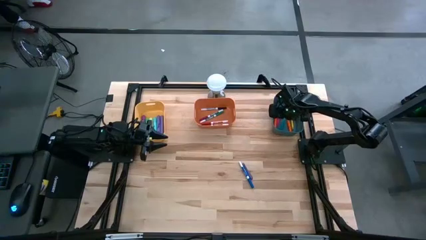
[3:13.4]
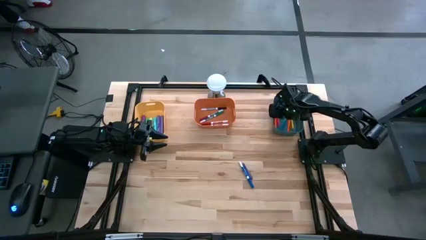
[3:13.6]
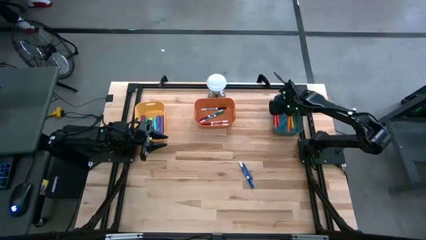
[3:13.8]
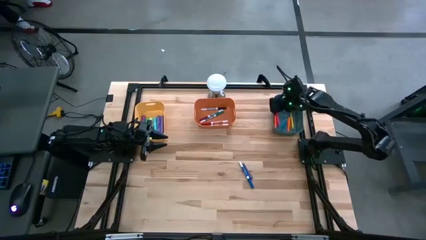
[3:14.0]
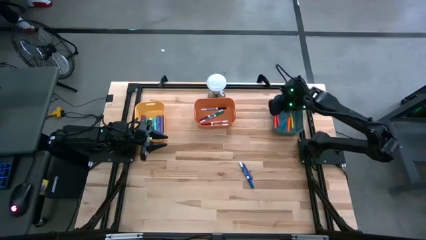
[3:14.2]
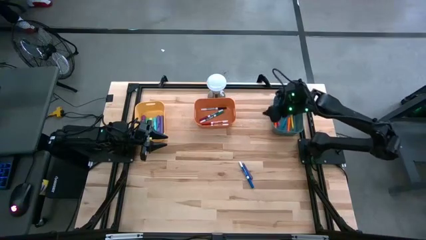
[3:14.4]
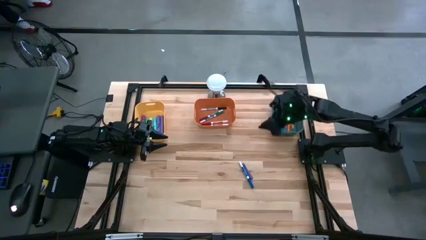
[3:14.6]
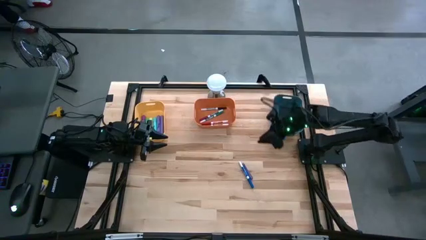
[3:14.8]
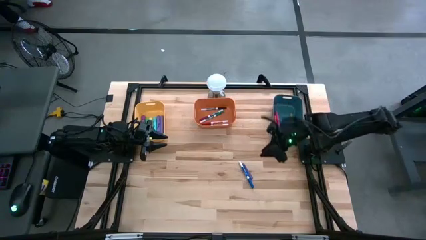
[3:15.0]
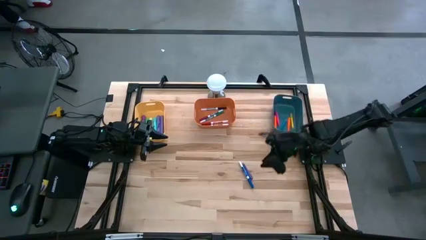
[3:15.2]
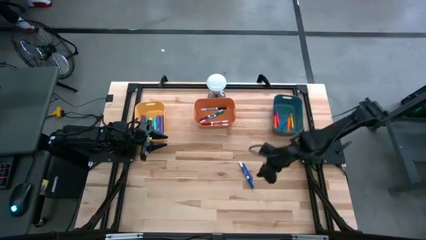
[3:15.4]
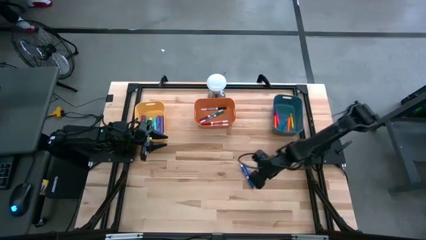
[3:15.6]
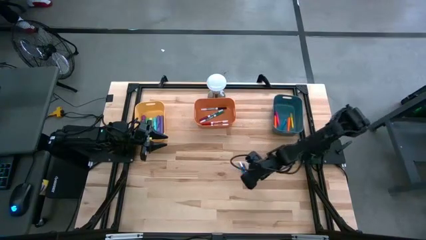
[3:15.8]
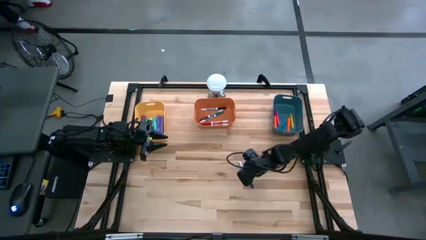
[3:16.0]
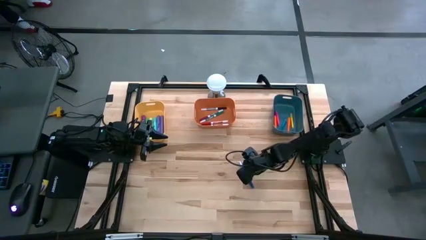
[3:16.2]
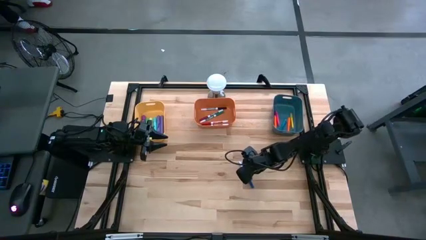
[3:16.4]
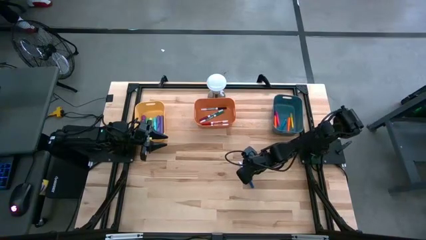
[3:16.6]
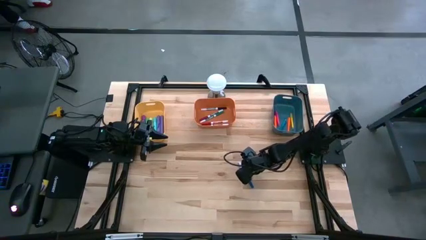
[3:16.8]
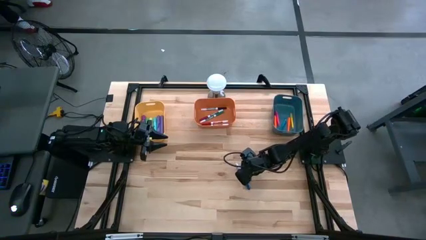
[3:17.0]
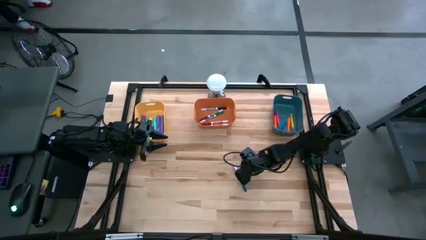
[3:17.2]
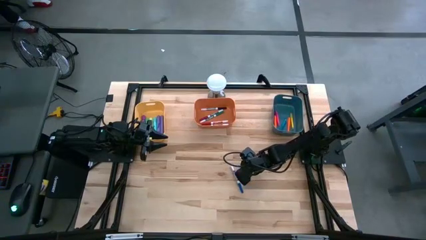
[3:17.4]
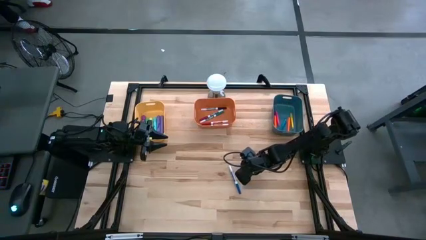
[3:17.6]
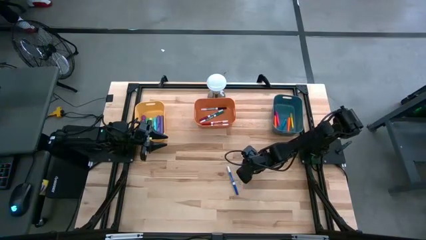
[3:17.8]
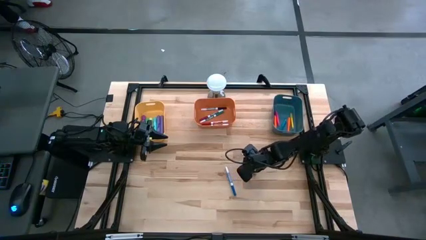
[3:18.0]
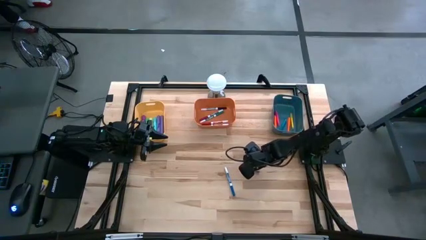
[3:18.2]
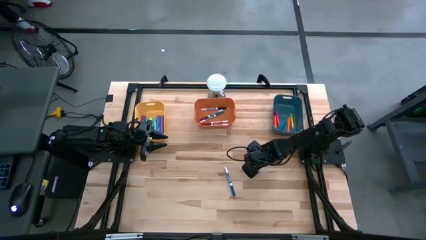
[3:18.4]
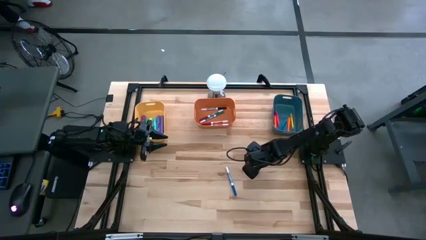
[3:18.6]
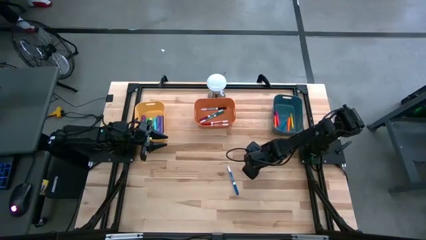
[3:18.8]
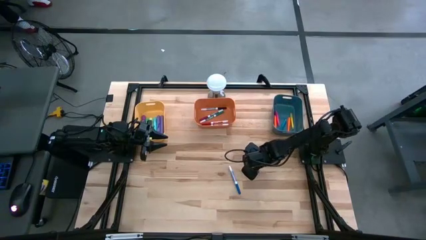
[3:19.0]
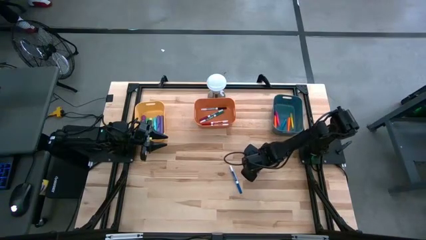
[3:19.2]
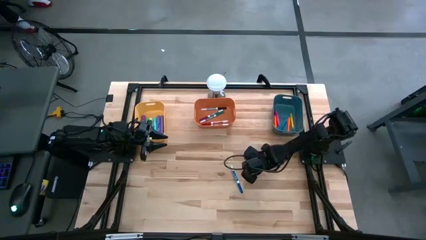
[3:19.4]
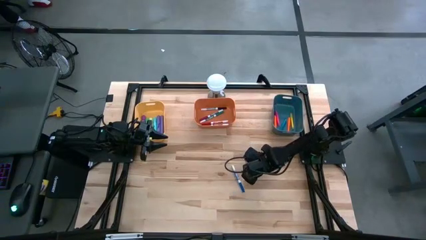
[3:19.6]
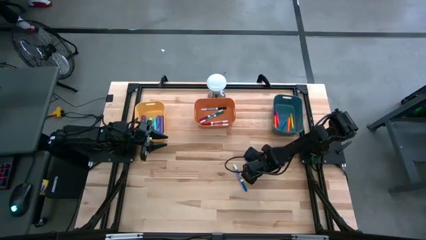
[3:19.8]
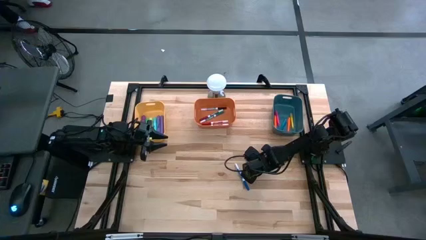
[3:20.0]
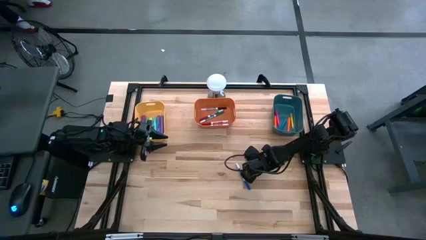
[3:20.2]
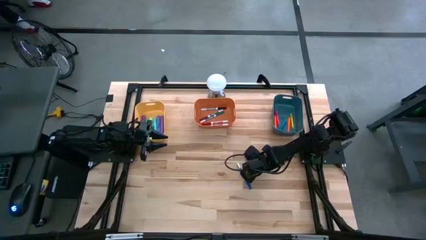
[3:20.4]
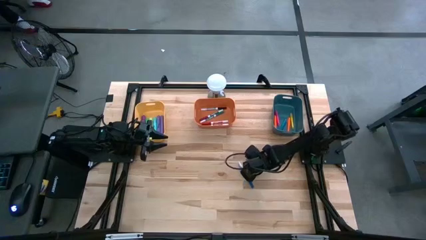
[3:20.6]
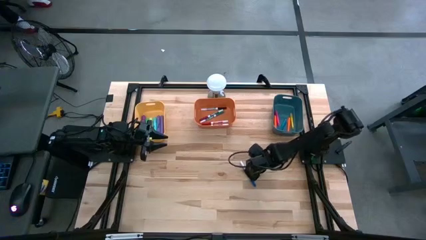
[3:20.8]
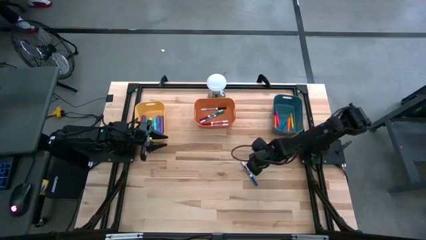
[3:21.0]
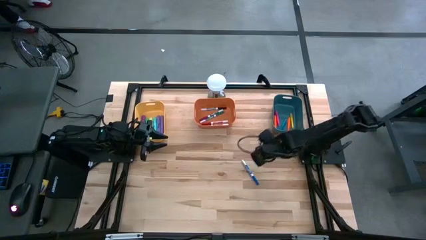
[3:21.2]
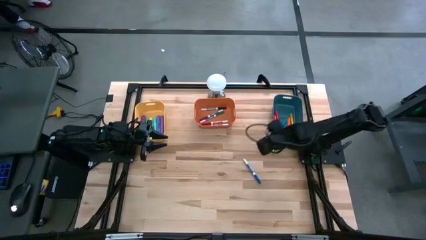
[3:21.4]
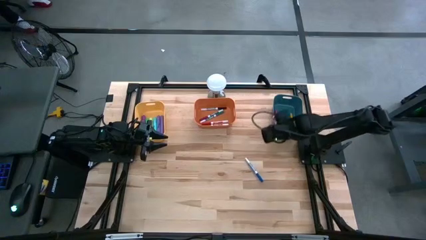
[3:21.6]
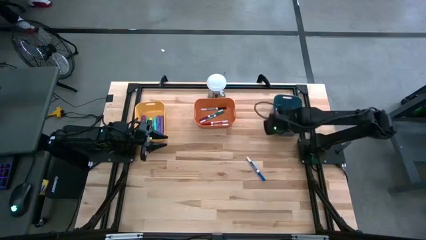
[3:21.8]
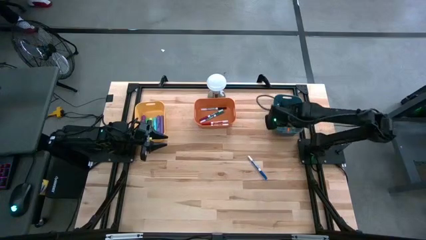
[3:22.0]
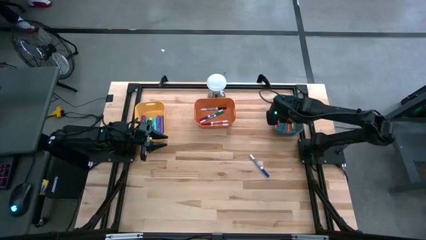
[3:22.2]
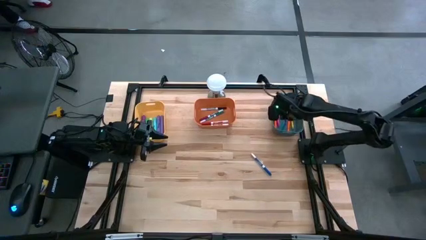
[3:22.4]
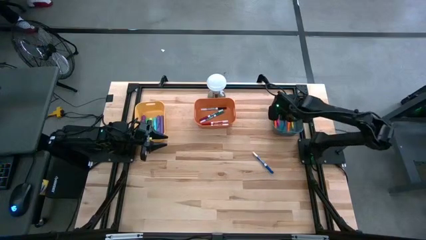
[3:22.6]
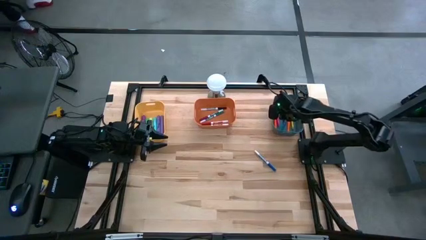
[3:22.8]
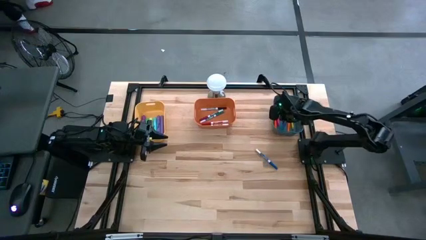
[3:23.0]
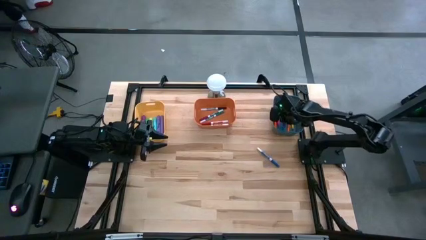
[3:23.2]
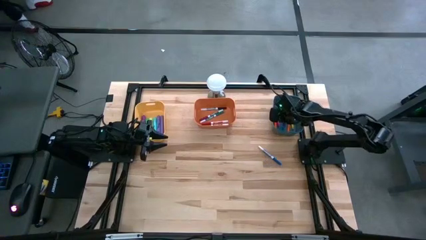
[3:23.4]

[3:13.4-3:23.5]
Task: Pick & Place Markers
Put the dark blue pen into the blue bin

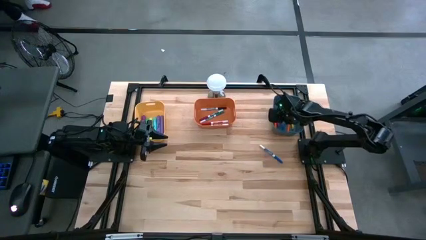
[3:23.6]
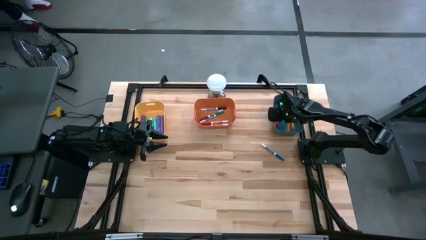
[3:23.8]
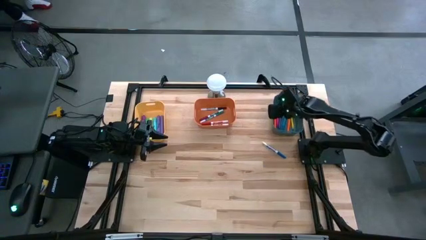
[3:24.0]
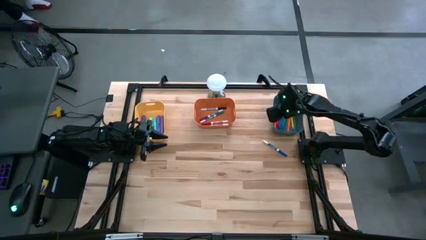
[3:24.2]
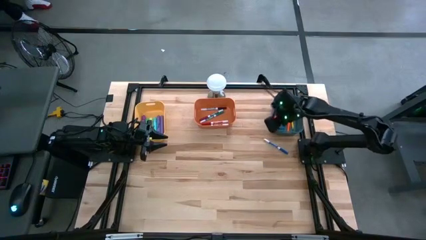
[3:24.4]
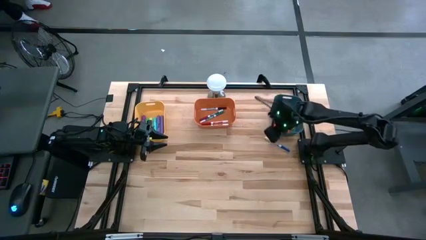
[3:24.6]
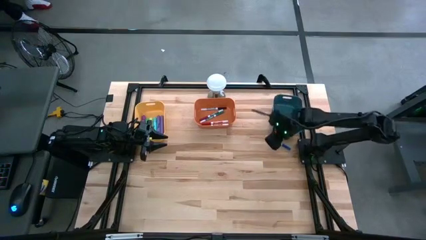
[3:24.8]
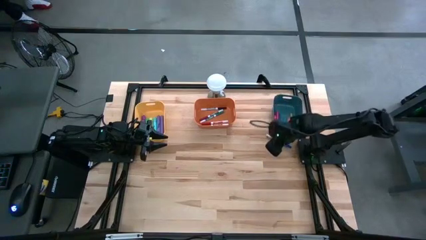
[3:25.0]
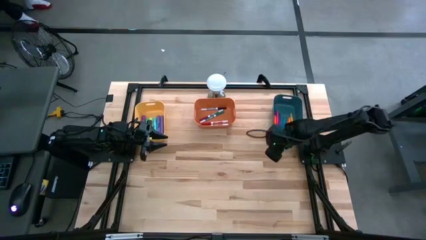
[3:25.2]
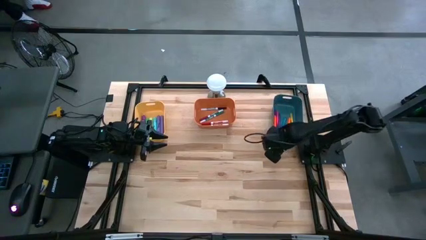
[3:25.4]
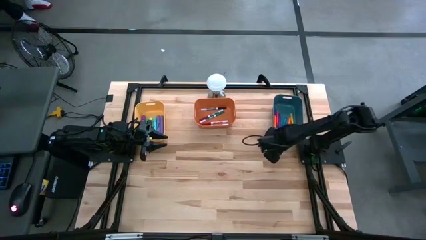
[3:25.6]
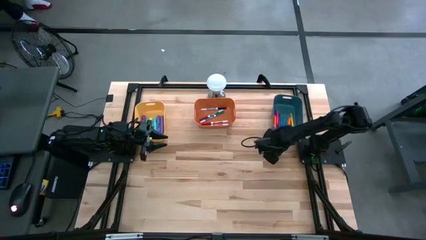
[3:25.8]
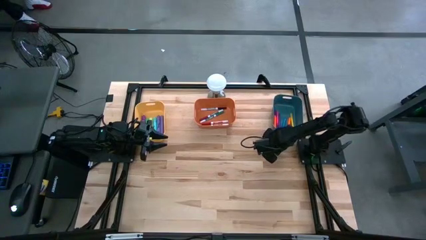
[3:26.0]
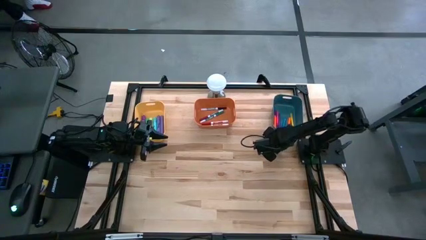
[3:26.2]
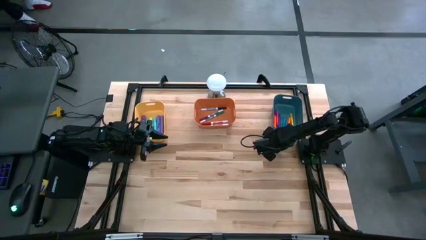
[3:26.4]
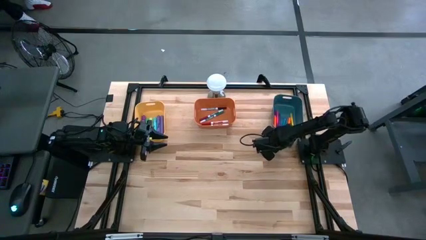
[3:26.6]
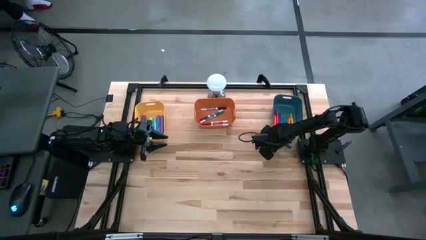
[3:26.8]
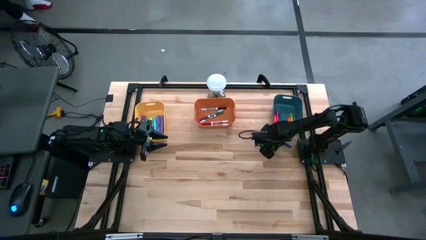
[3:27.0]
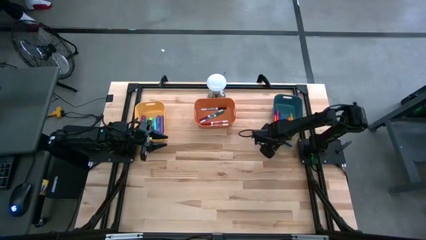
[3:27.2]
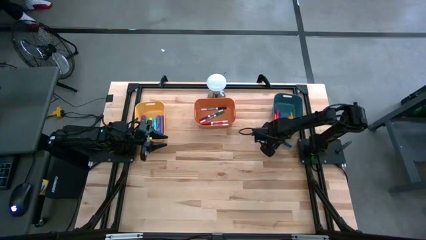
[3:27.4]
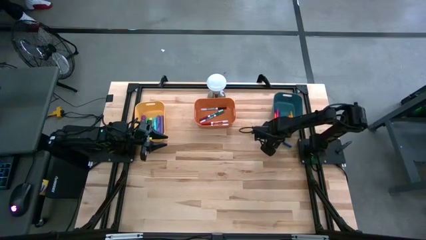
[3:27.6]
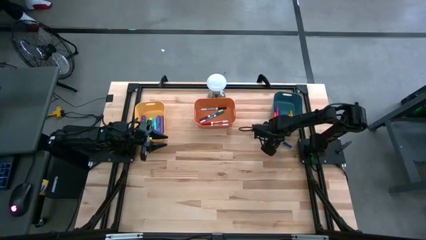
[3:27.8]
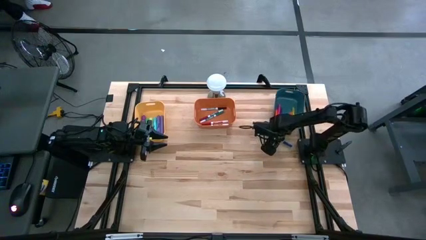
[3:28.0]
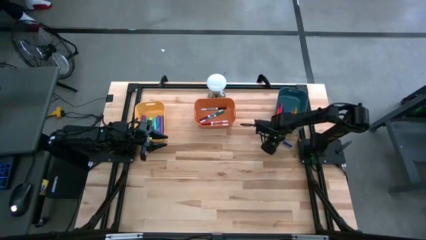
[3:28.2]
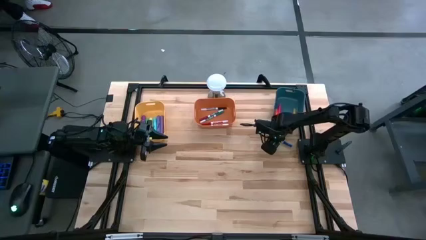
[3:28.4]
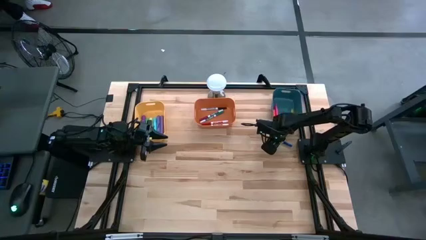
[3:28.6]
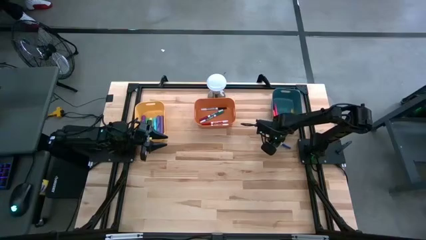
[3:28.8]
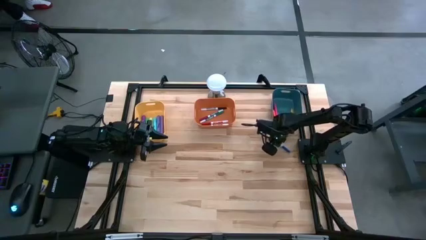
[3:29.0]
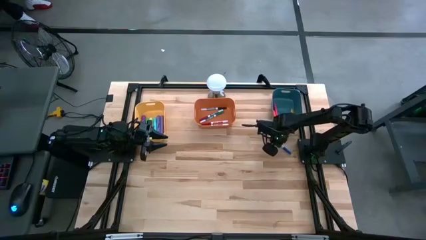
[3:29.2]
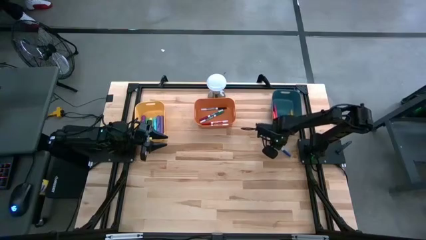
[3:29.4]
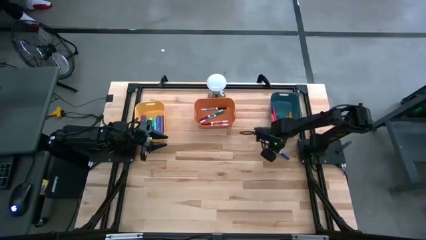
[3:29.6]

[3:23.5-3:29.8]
Put the blue marker pen into the orange bin
